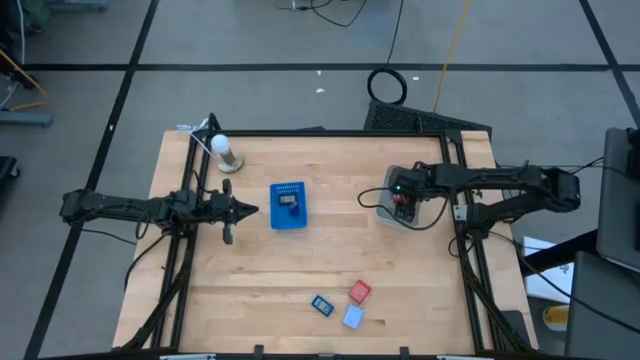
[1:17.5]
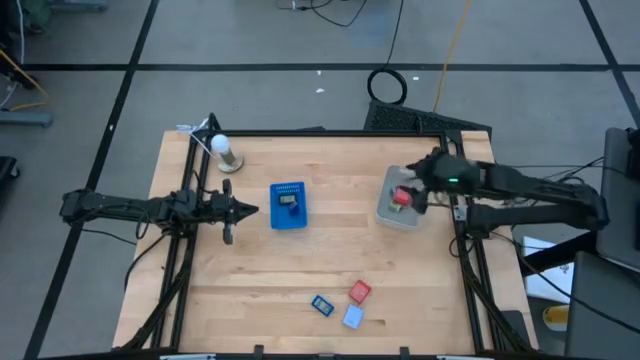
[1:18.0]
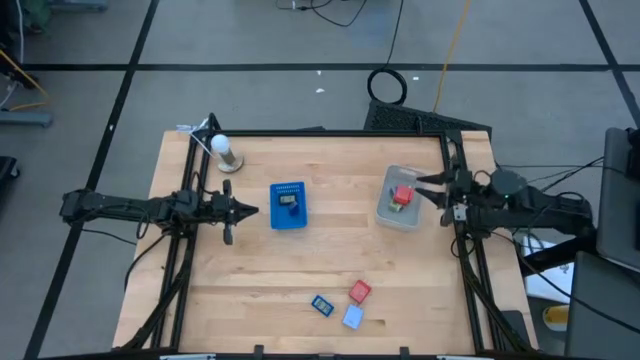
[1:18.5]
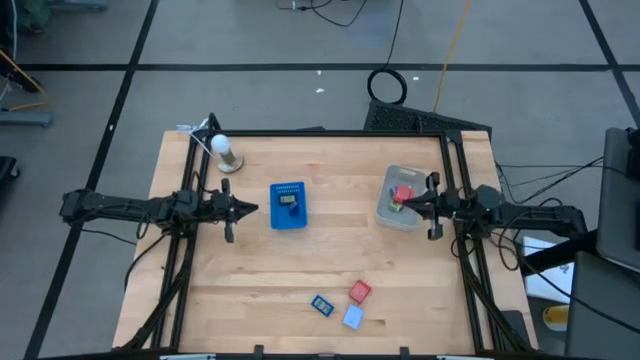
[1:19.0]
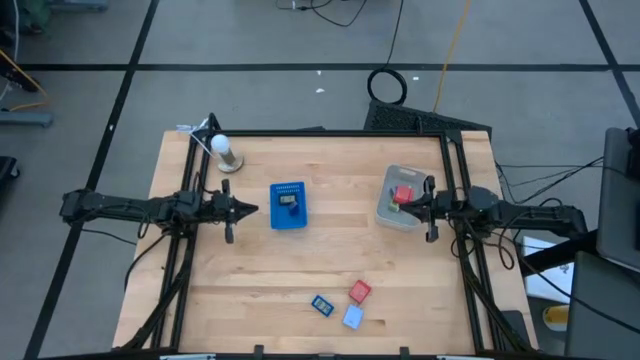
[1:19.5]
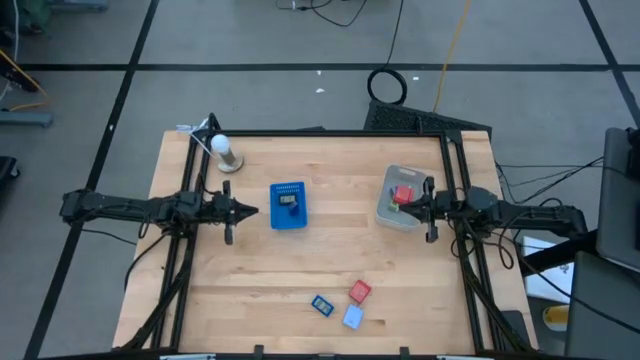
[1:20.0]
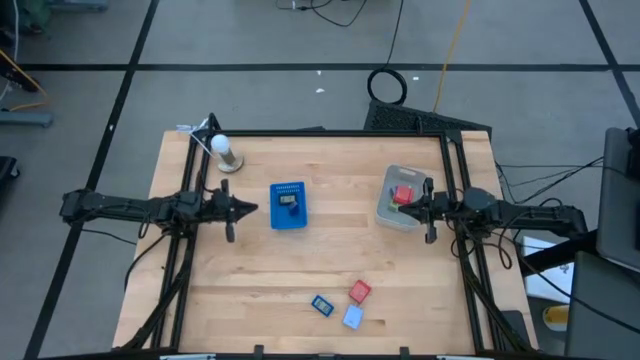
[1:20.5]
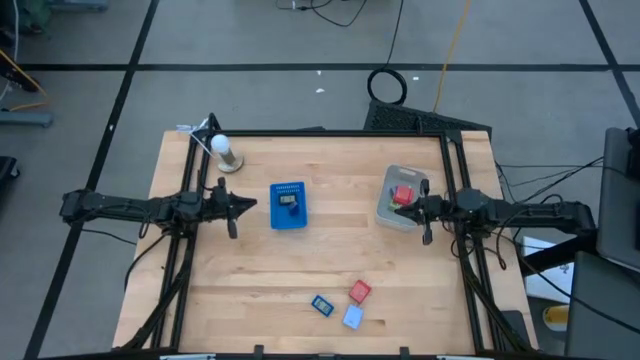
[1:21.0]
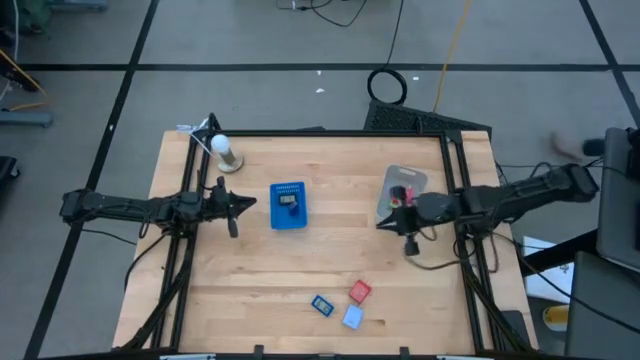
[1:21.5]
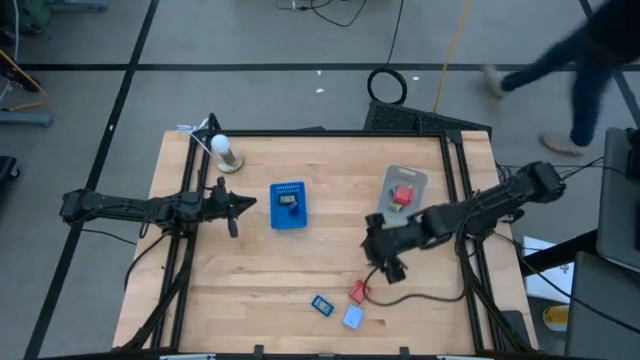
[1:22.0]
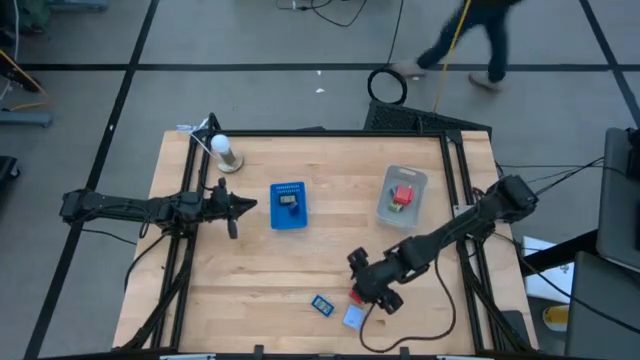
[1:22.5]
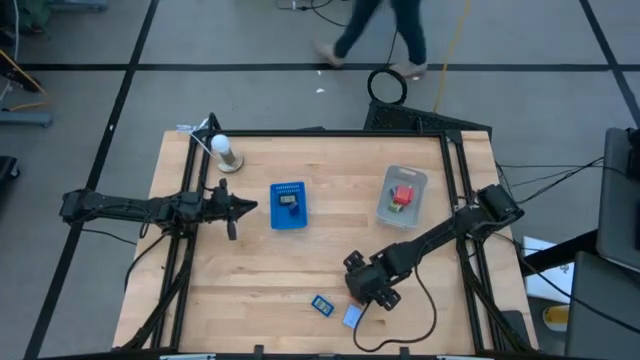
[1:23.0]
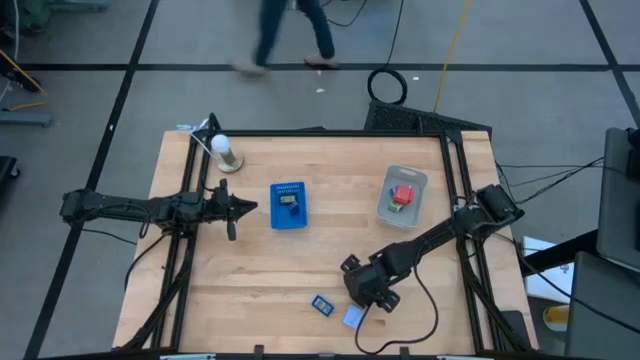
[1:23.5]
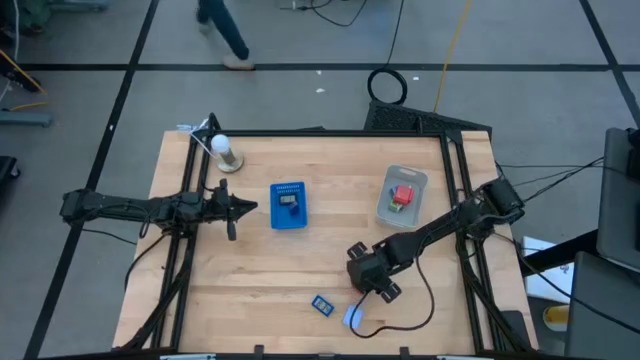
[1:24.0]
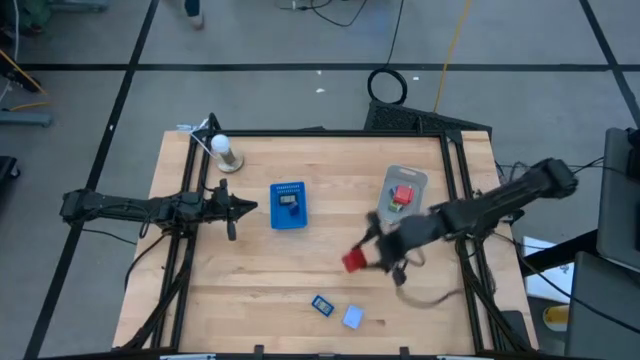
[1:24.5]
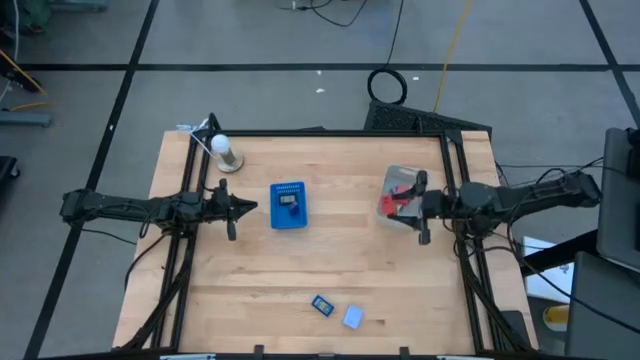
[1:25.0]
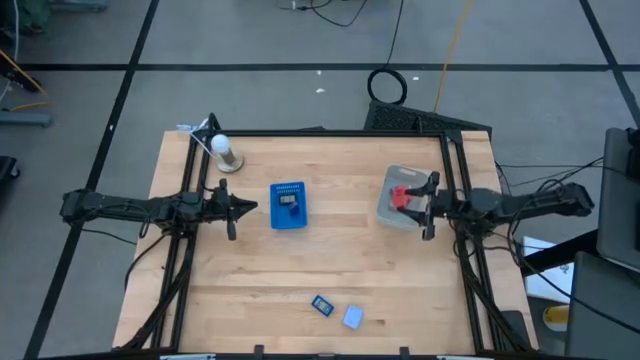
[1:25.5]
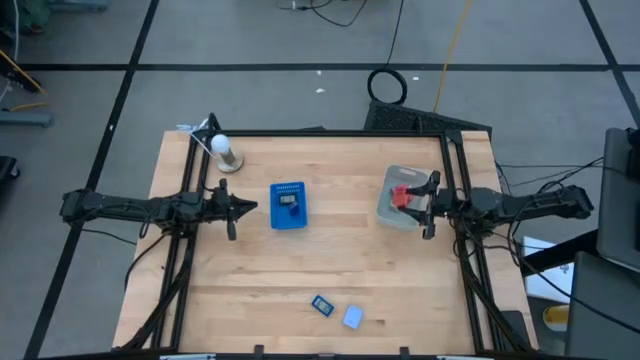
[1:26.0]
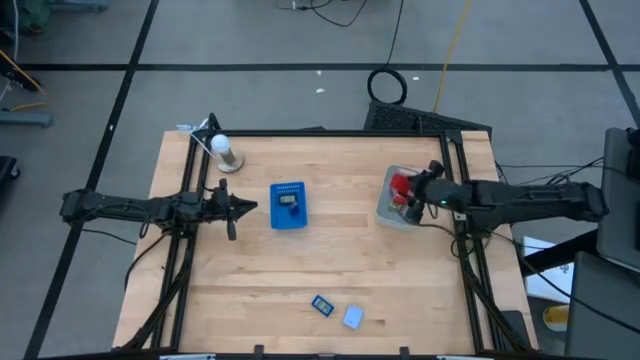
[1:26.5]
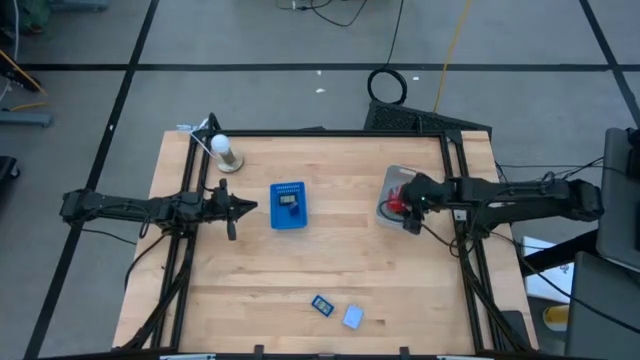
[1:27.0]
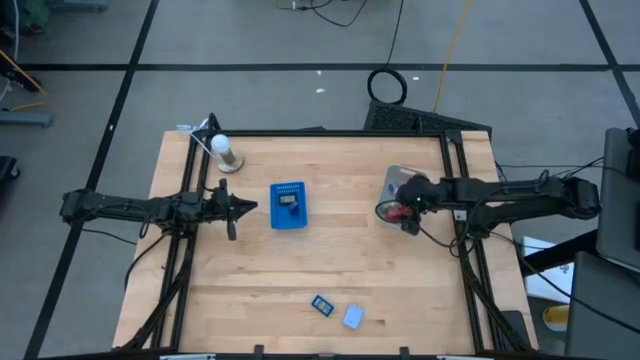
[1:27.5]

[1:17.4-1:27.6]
Task: Pick & Place Office items
Put the red charger adapter into the white bin

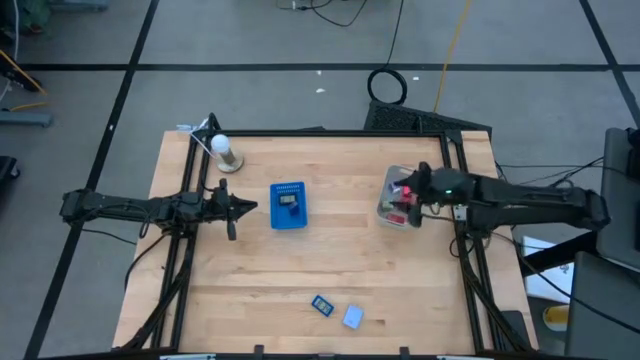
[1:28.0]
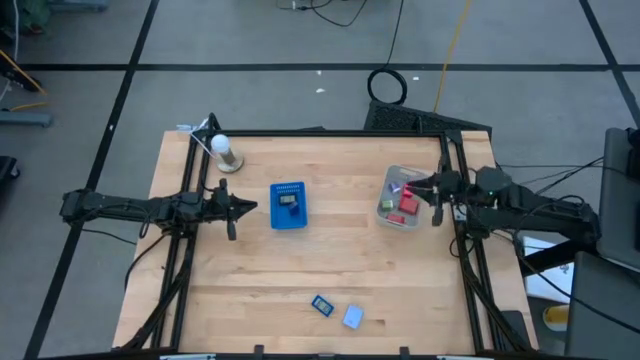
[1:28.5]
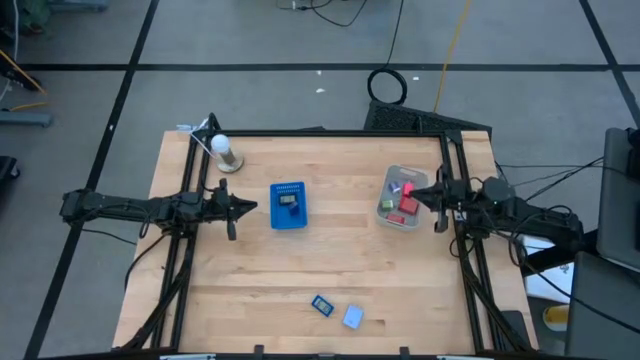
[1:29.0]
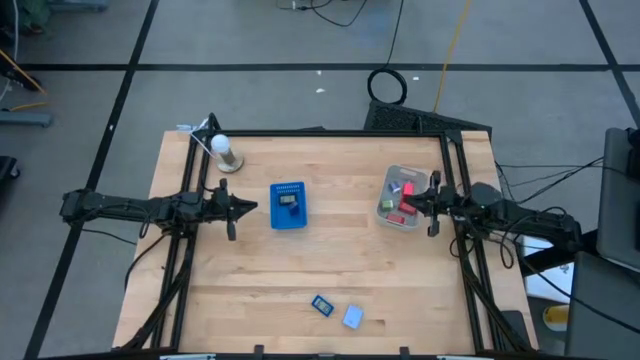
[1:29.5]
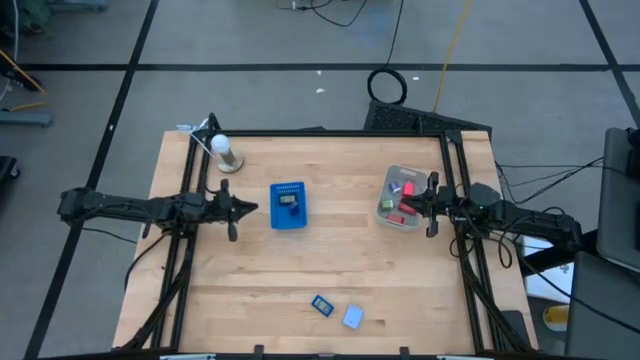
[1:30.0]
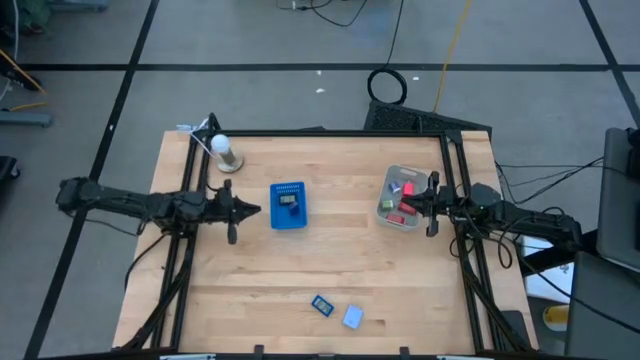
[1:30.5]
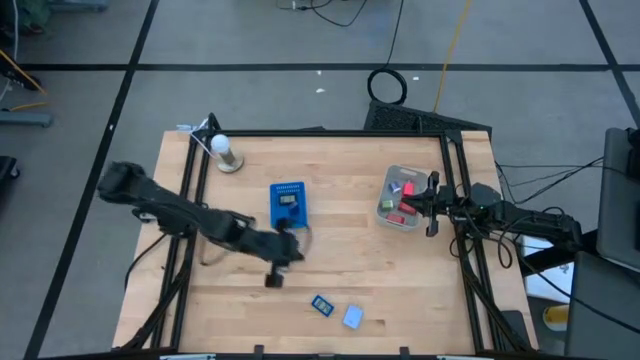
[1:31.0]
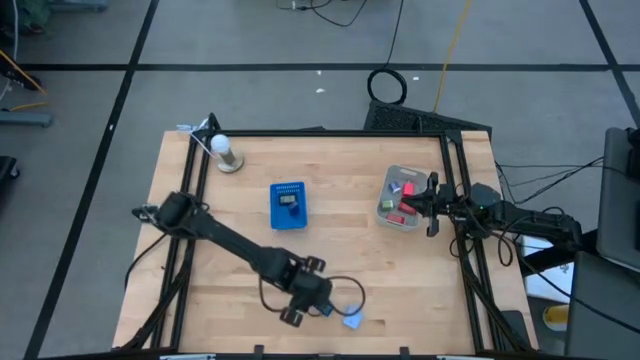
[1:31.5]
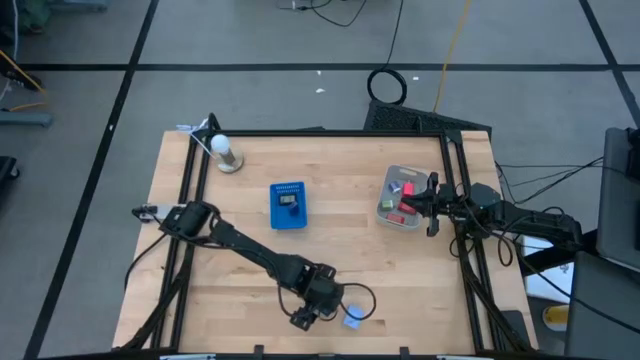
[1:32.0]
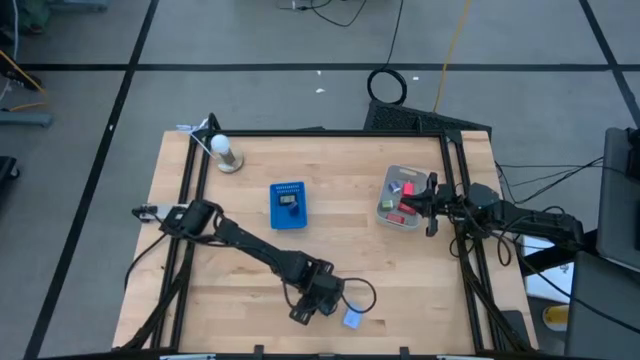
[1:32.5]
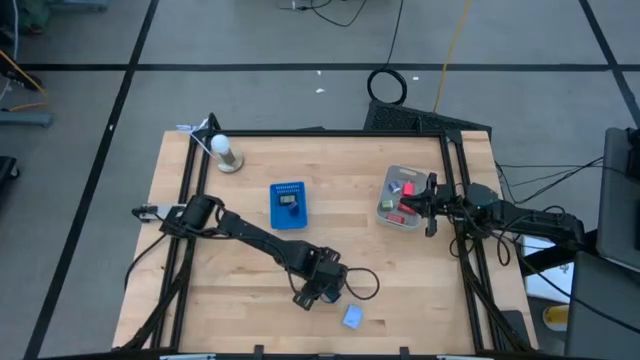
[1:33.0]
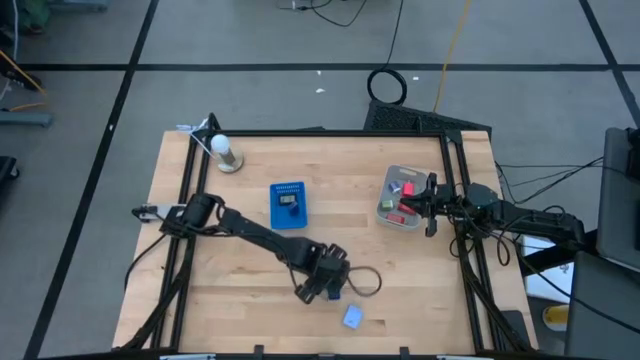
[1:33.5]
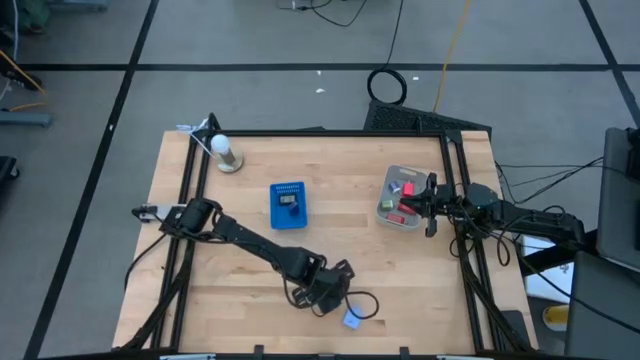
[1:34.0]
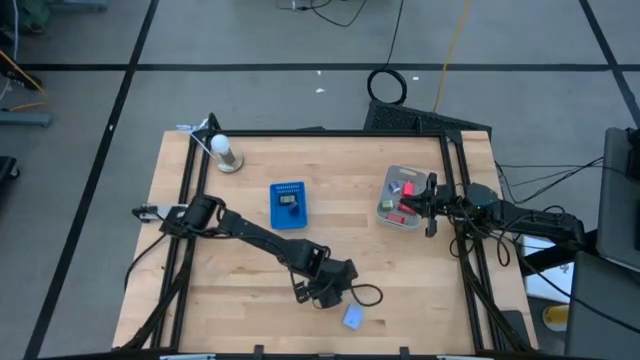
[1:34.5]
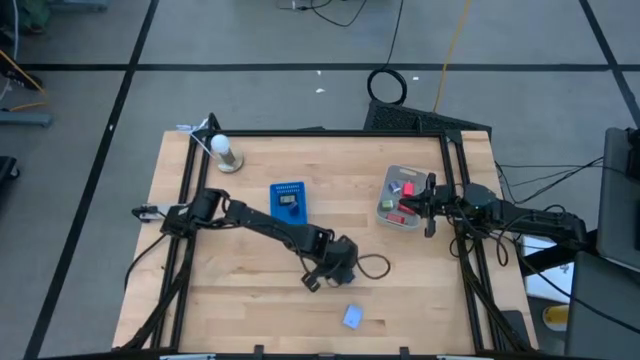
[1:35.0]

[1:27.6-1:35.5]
Put the blue digital clock into the blue bin

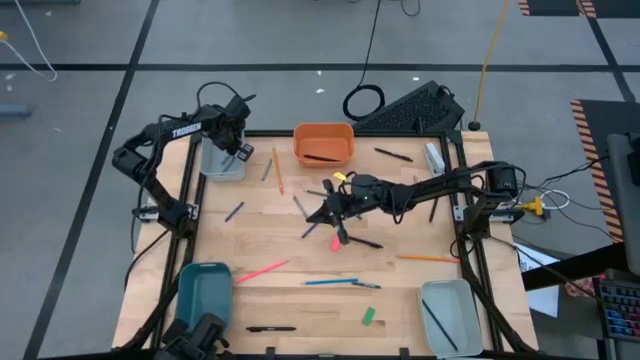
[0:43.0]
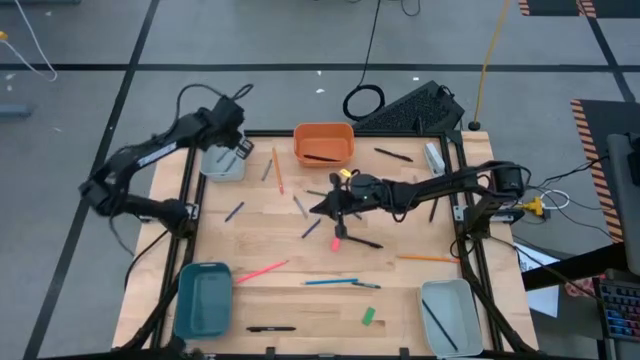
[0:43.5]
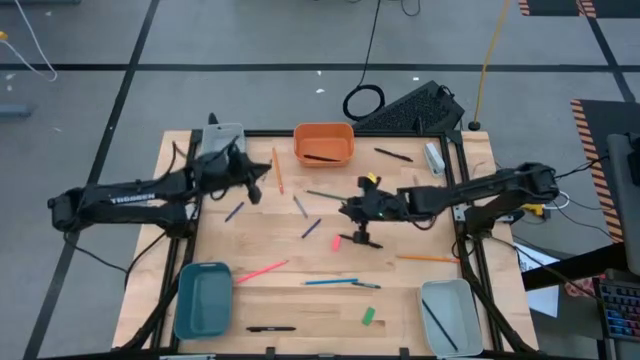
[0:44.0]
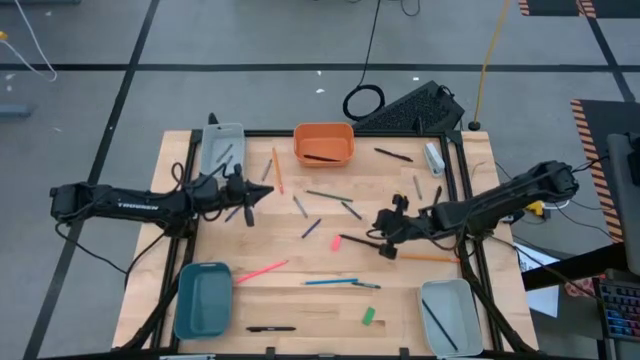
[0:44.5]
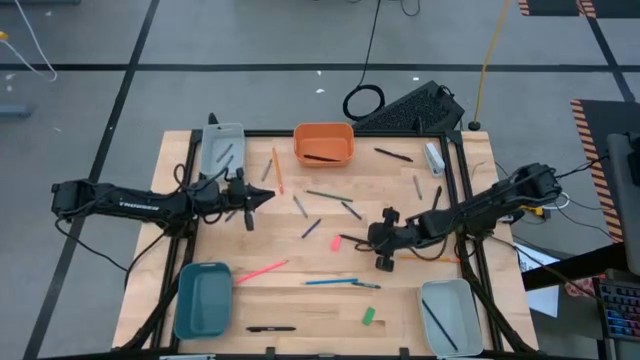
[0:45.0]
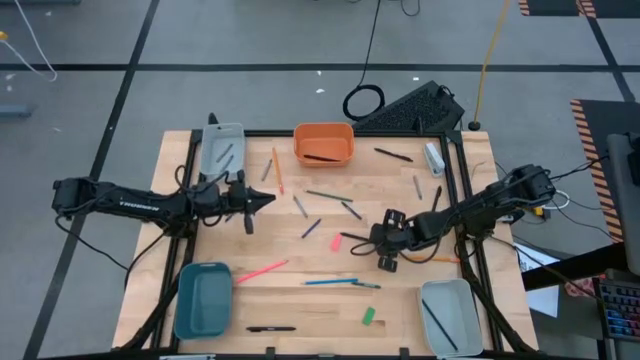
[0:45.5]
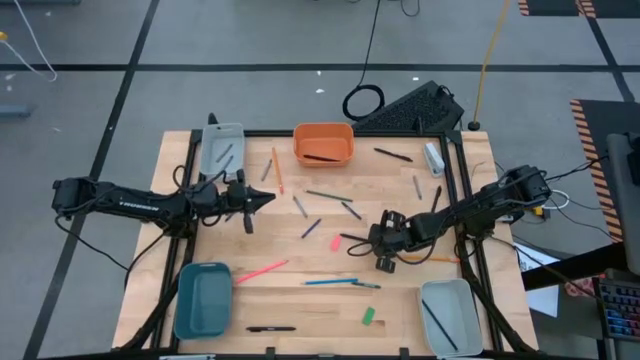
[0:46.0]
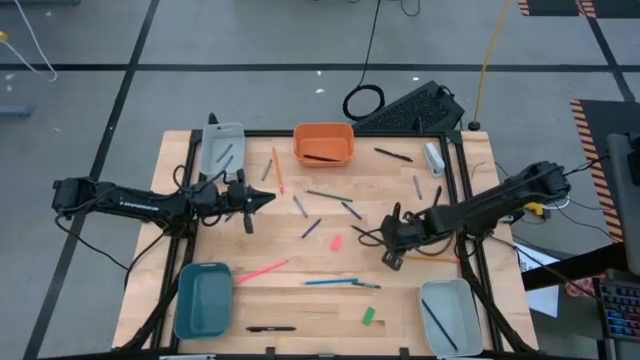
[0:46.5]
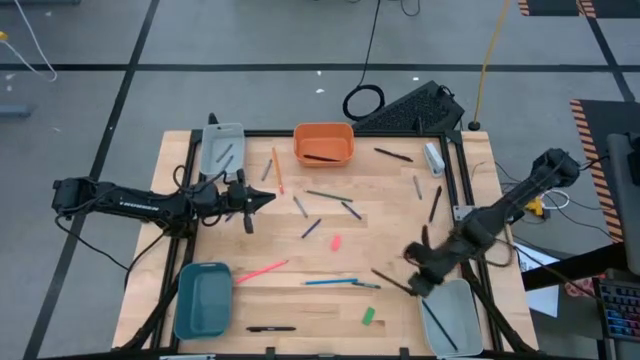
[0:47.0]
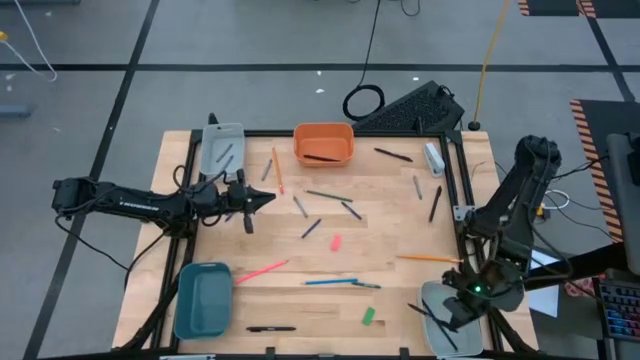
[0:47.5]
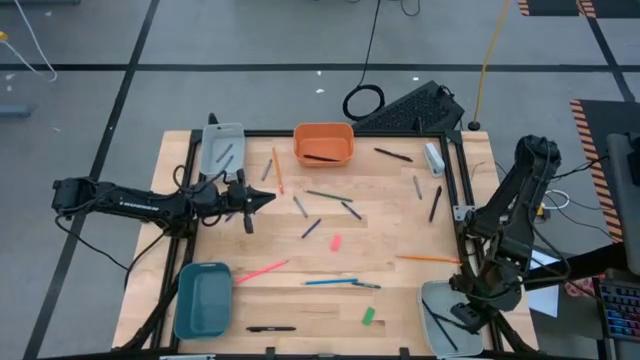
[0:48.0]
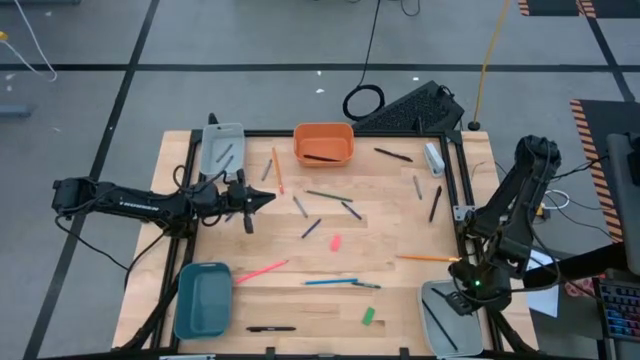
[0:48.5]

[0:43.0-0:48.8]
Task: Sort crayons/erasers/pens/pencils in bins
Put the black pen into the bottom gray bin
